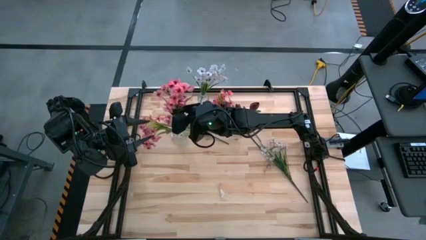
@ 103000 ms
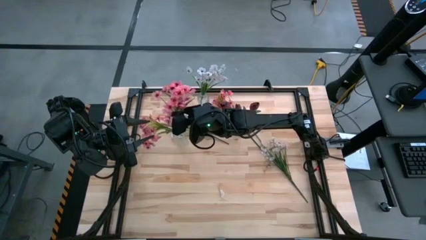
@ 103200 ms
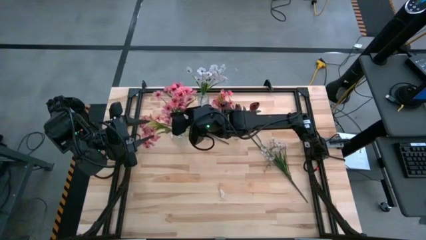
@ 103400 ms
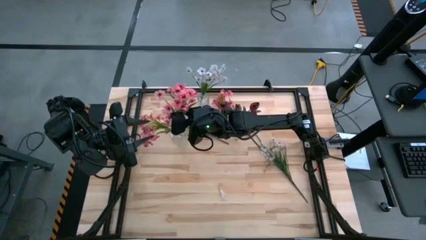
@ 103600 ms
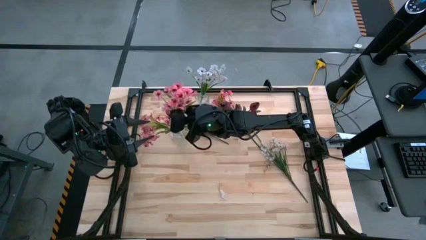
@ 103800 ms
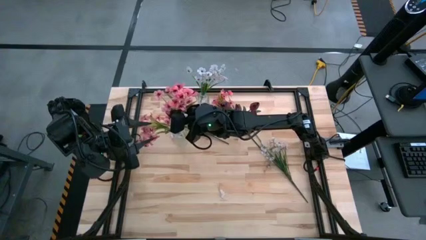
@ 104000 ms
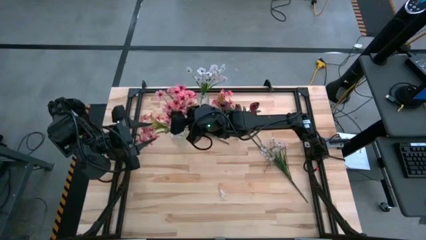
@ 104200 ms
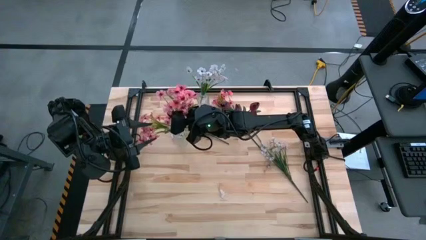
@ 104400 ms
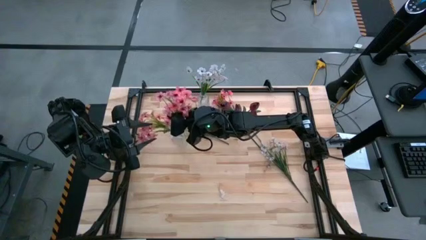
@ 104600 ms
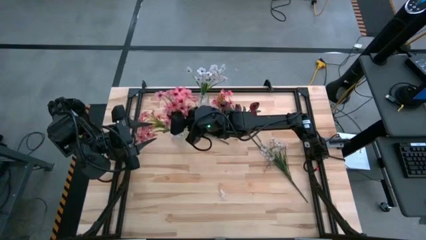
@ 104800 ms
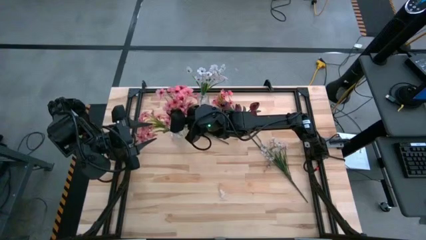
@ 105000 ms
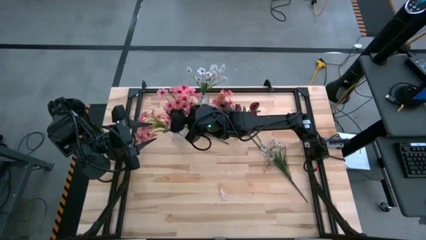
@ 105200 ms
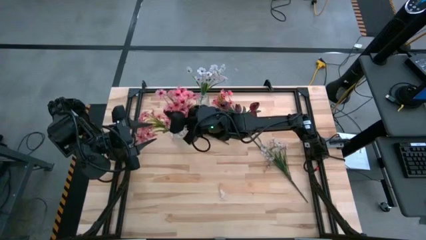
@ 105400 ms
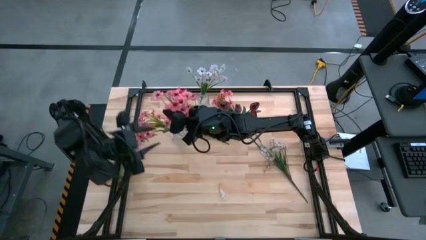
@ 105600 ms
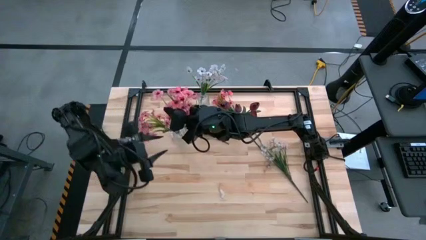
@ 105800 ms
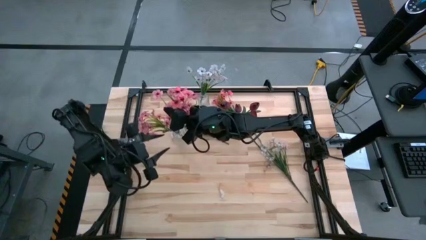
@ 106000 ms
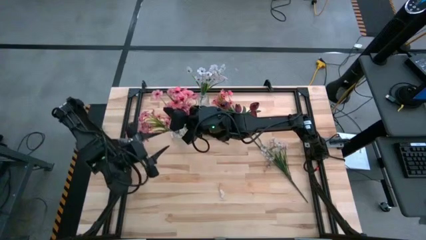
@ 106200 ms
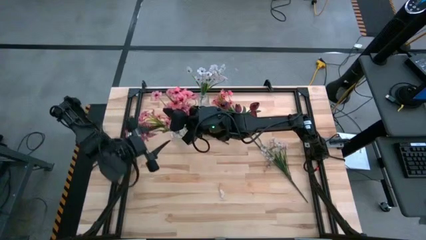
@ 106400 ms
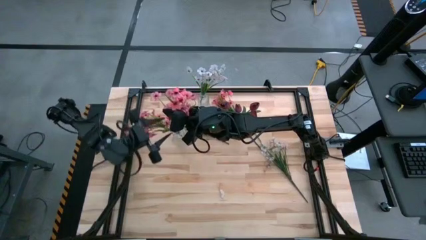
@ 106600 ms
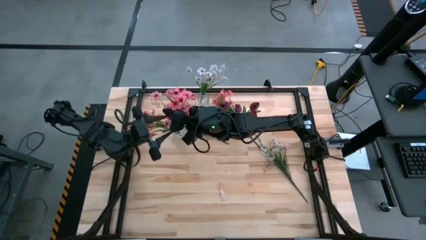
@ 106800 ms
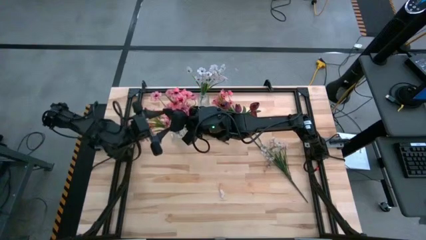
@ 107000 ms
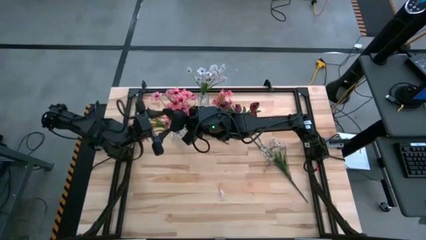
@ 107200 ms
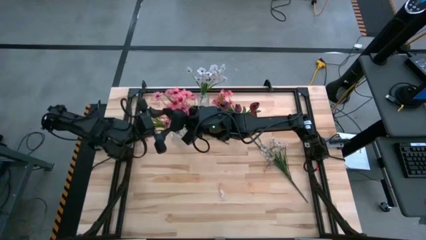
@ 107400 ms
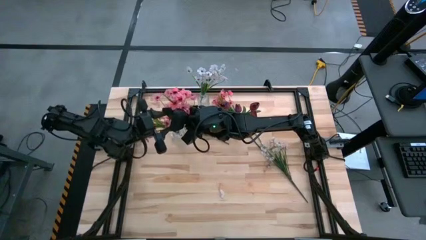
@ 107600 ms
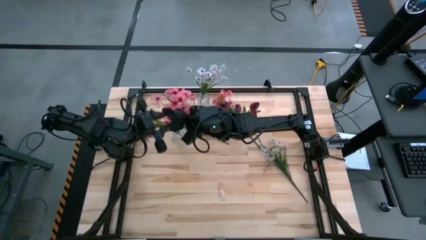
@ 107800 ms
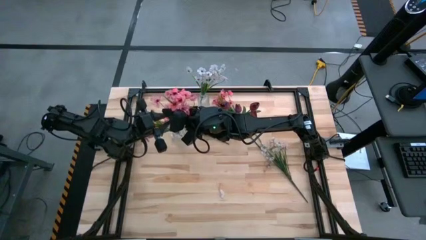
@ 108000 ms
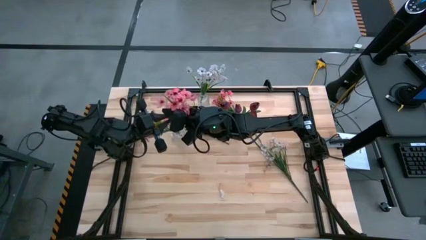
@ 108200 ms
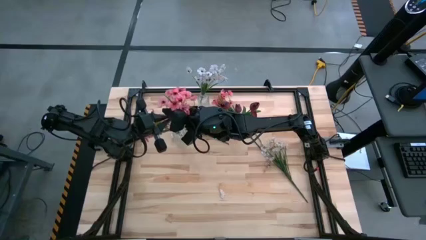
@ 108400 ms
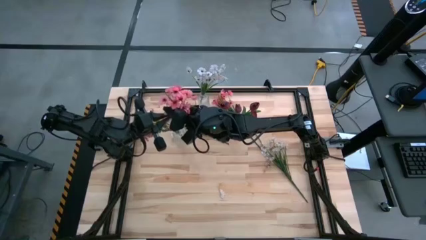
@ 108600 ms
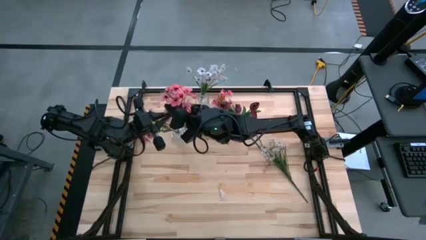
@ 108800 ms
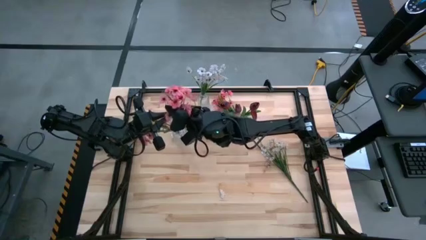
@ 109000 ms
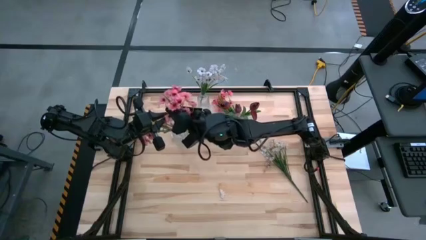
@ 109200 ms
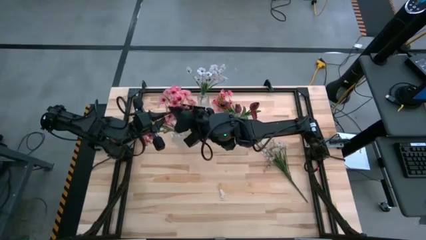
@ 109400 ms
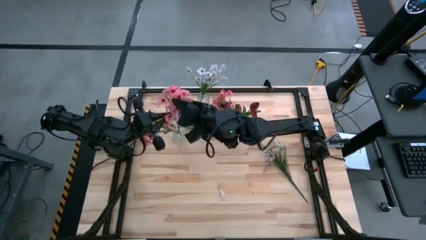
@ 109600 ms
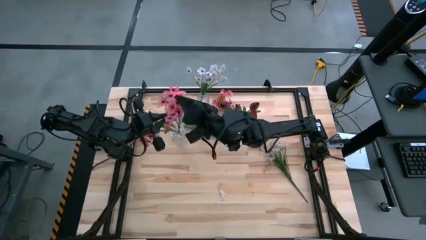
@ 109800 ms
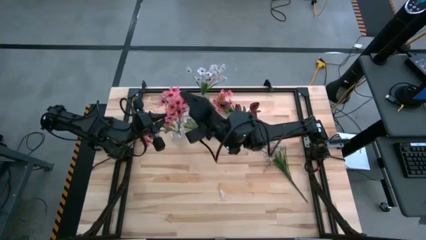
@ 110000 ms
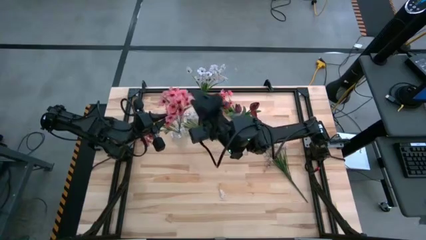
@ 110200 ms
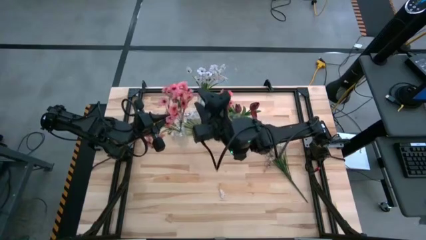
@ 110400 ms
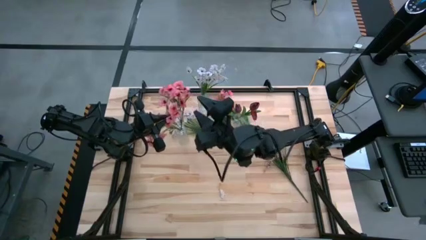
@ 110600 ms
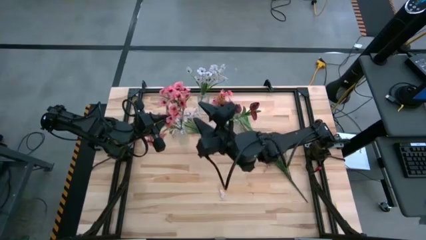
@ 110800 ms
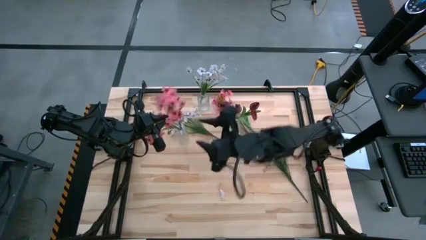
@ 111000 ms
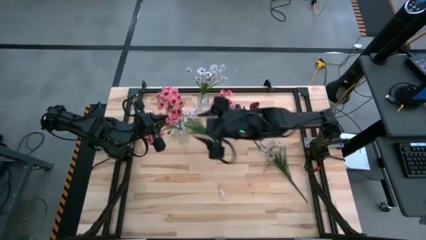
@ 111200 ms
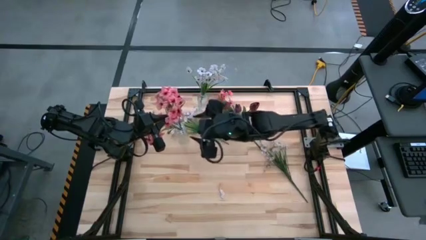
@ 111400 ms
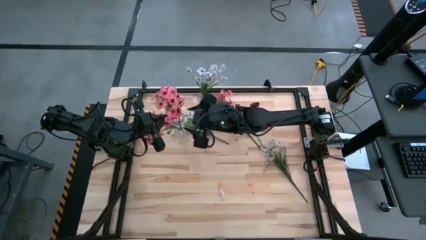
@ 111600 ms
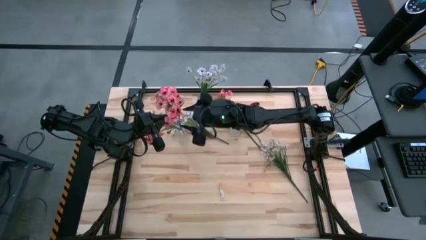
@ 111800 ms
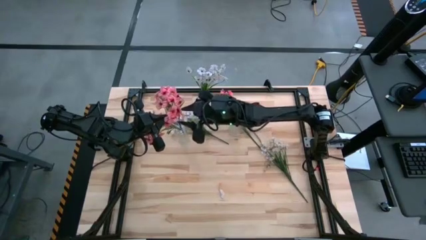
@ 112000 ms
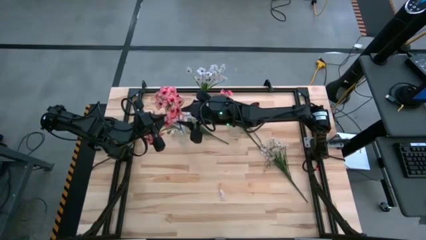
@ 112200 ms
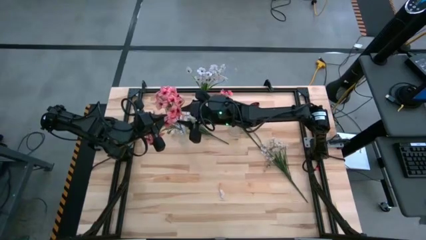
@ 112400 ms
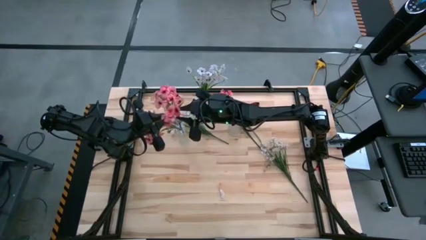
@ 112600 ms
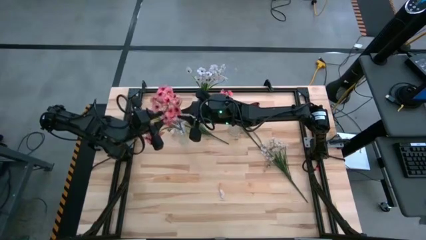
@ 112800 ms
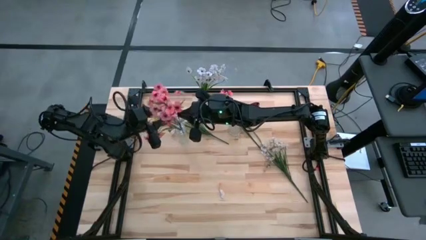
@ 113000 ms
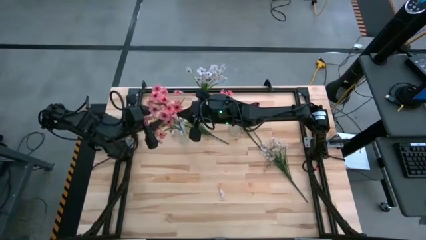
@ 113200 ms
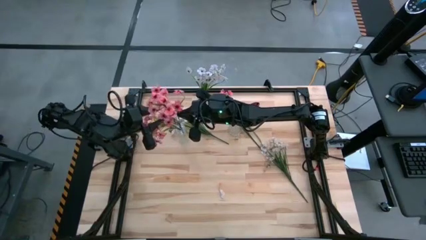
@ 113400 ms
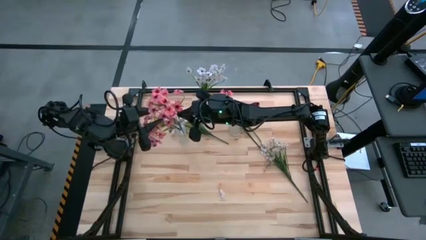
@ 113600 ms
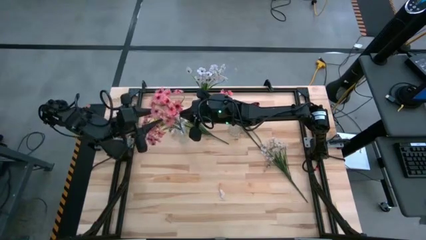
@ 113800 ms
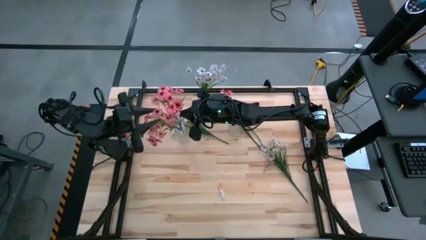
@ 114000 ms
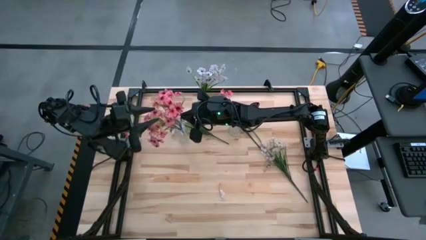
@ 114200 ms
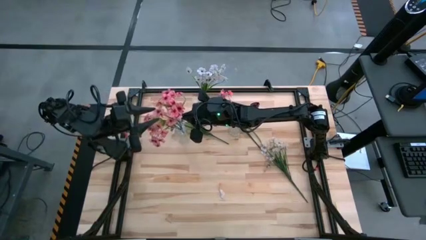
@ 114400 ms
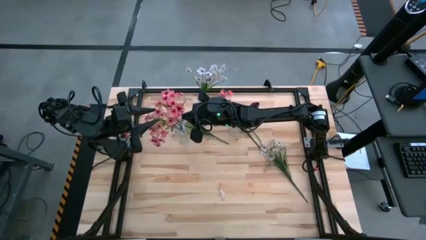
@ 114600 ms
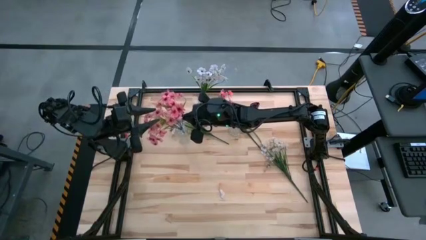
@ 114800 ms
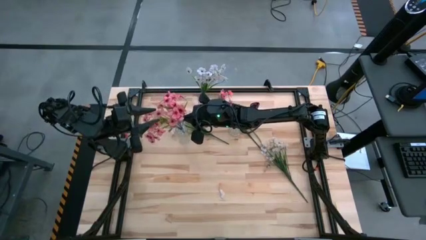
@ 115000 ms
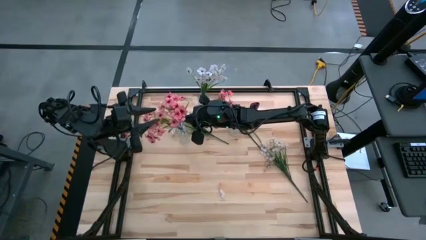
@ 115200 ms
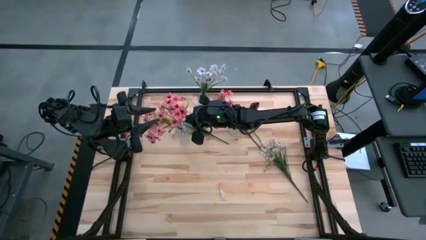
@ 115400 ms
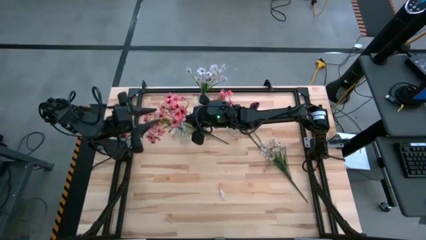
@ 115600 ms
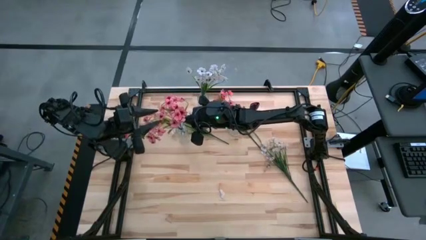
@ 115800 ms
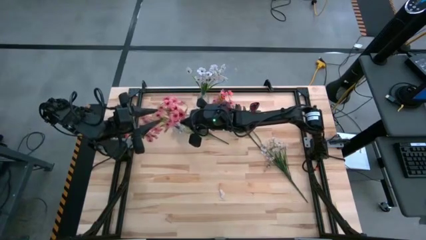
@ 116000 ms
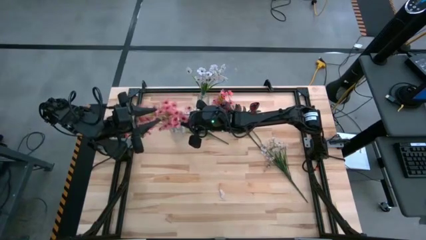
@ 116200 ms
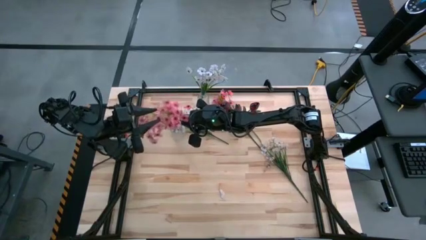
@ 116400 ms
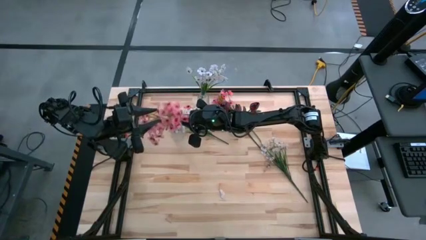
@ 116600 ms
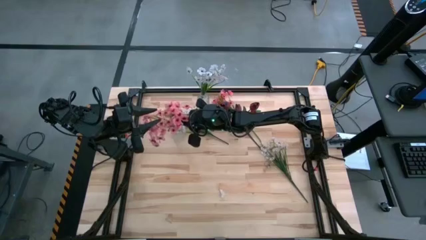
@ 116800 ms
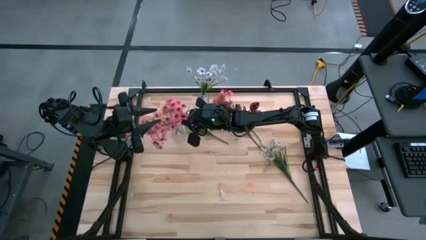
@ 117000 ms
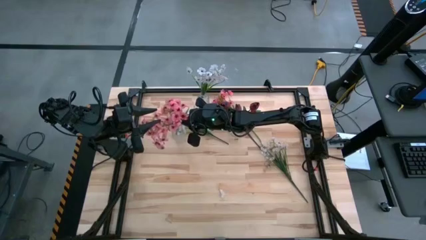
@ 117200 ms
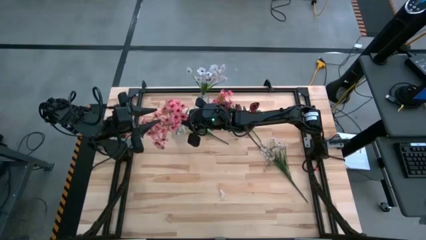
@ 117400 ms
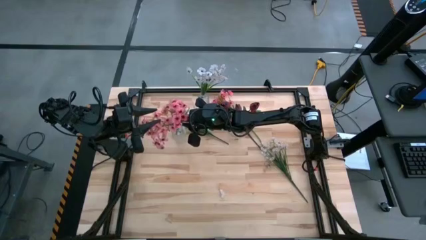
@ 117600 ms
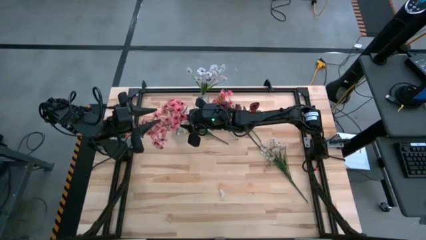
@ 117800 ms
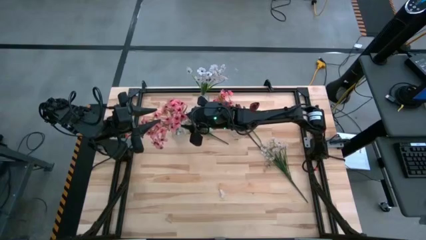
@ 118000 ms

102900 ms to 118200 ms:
Task: Sort flowers into vase by color
Put the left pink flower into the bottom left transparent vase
